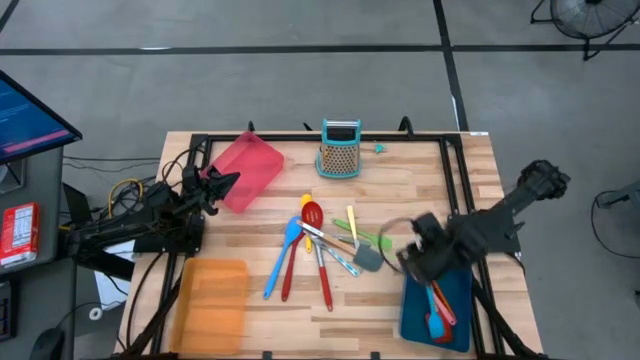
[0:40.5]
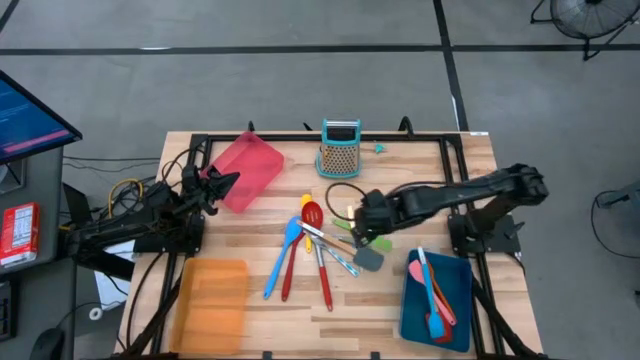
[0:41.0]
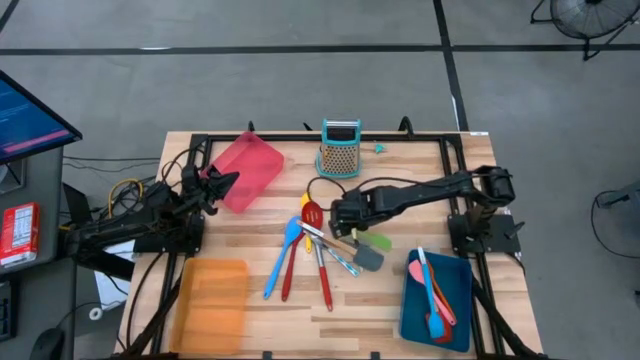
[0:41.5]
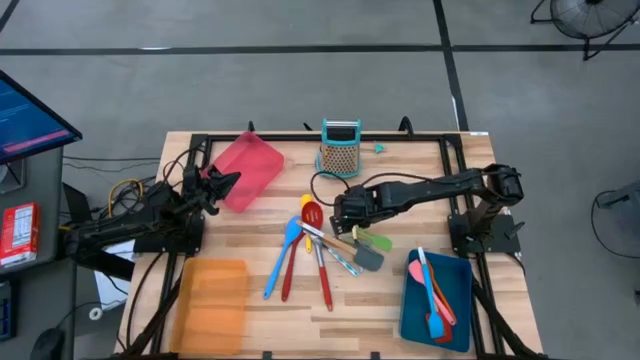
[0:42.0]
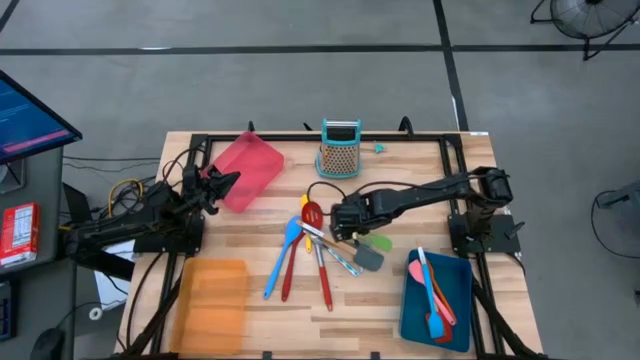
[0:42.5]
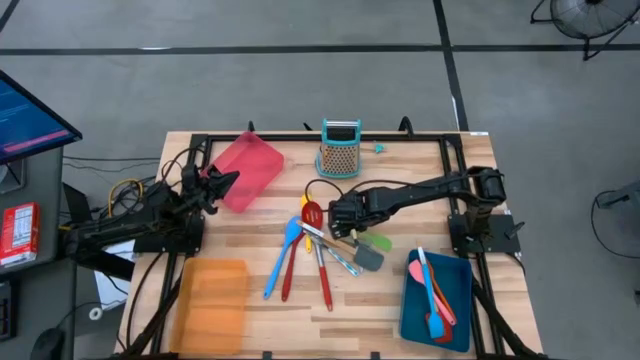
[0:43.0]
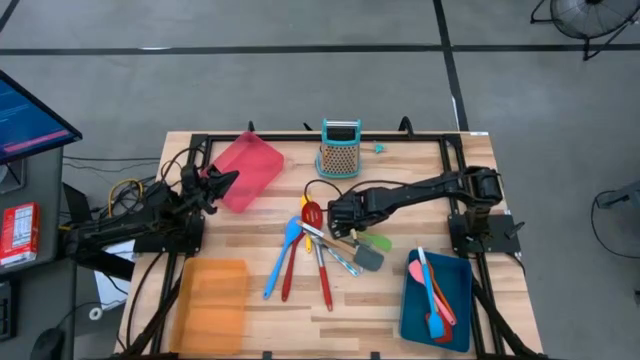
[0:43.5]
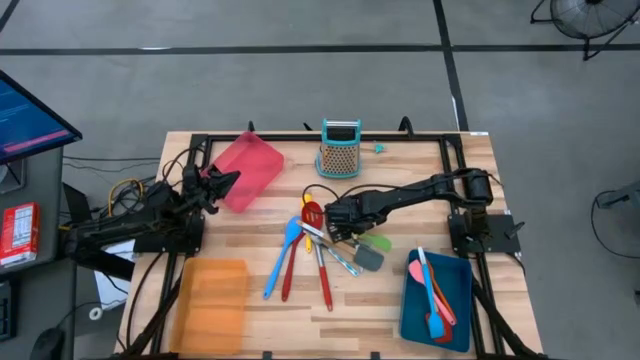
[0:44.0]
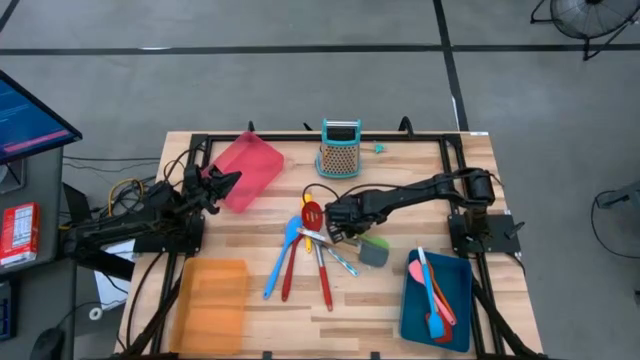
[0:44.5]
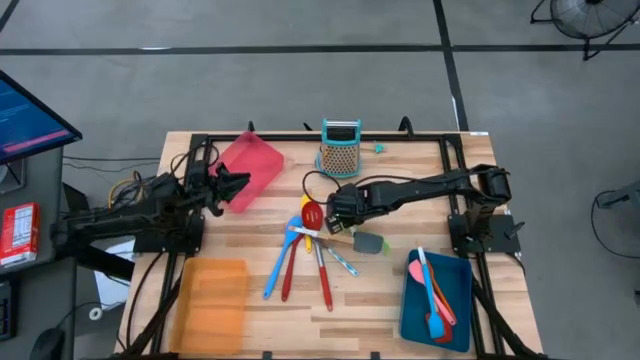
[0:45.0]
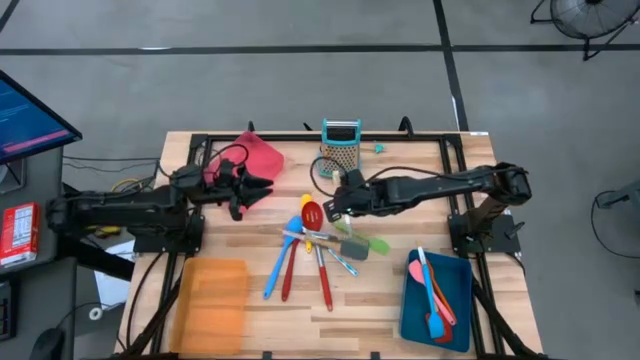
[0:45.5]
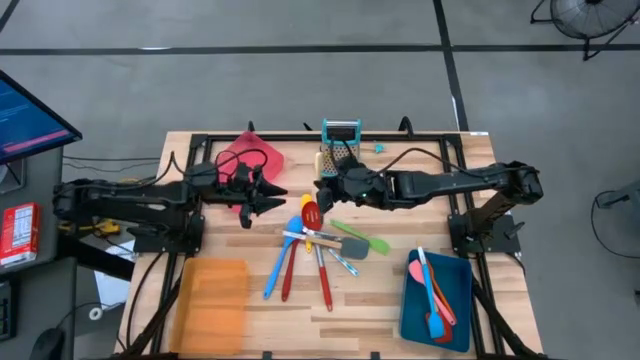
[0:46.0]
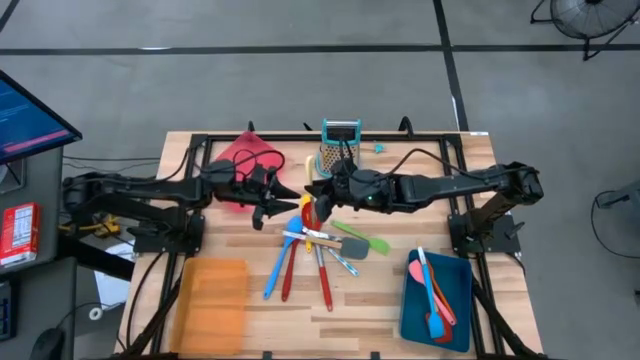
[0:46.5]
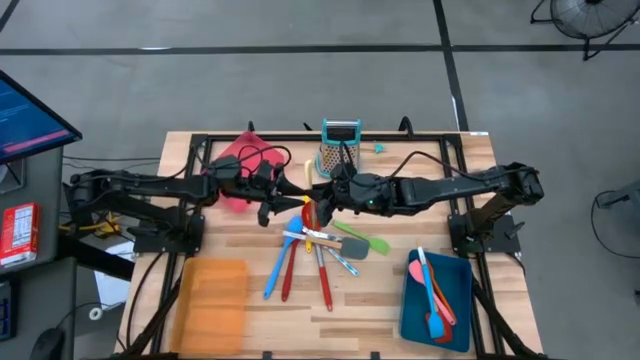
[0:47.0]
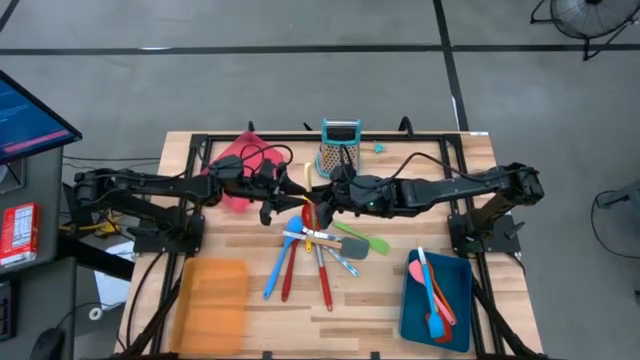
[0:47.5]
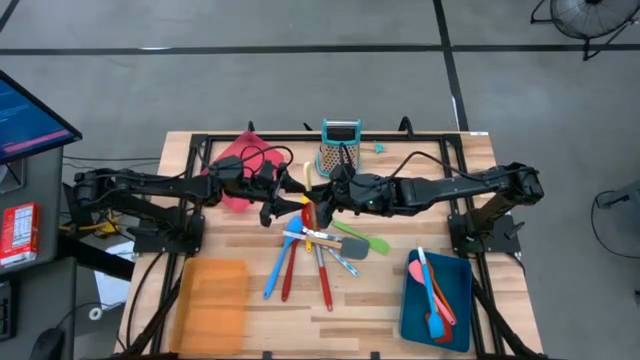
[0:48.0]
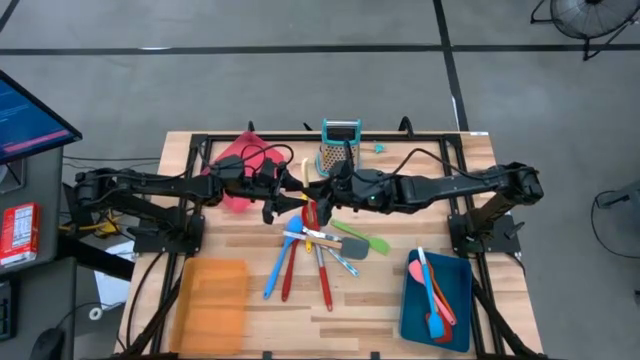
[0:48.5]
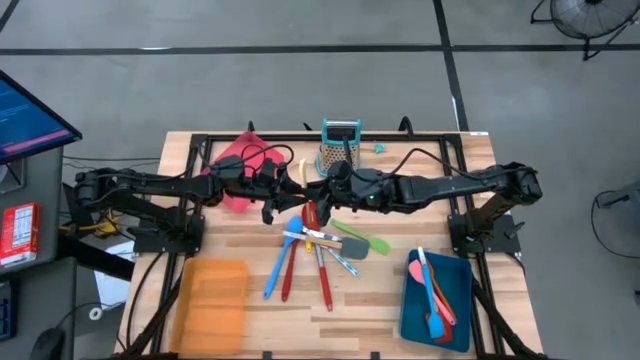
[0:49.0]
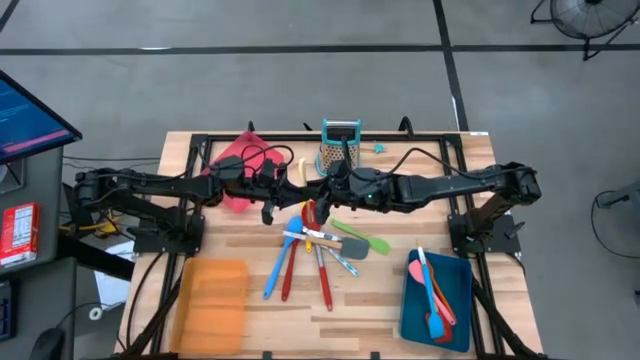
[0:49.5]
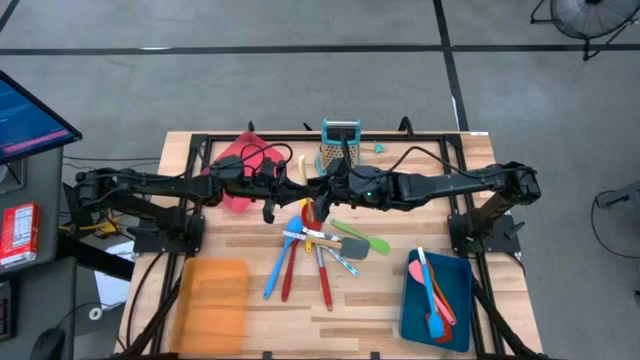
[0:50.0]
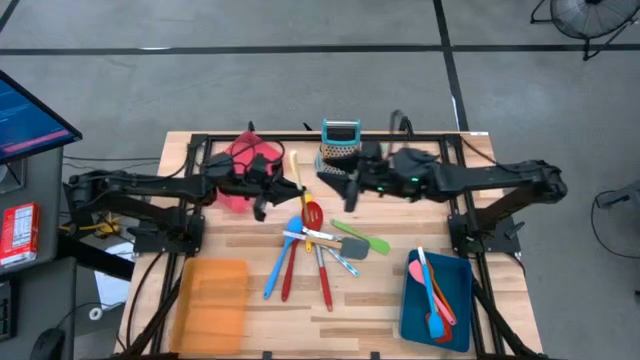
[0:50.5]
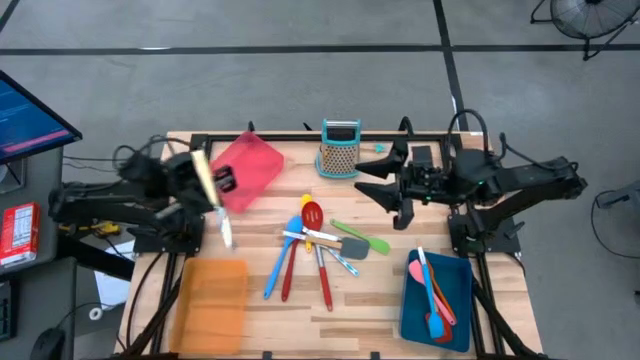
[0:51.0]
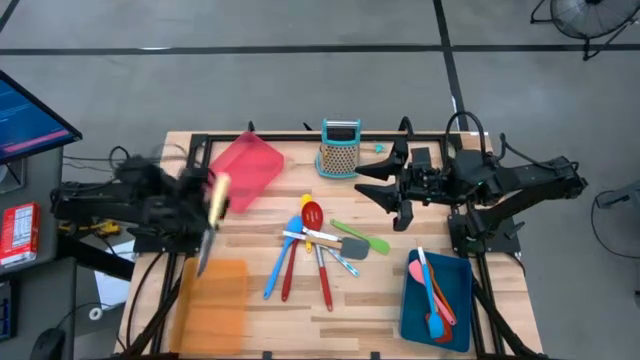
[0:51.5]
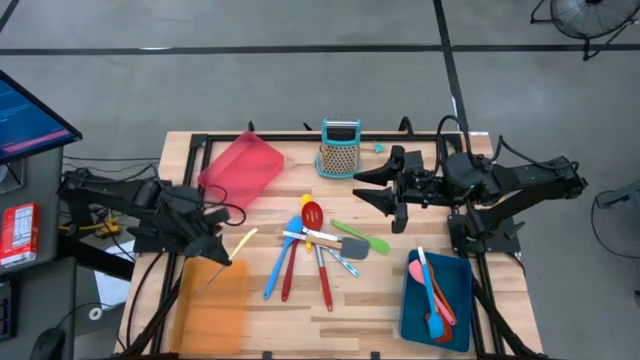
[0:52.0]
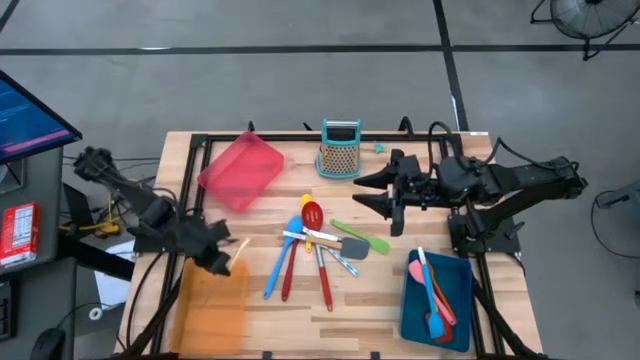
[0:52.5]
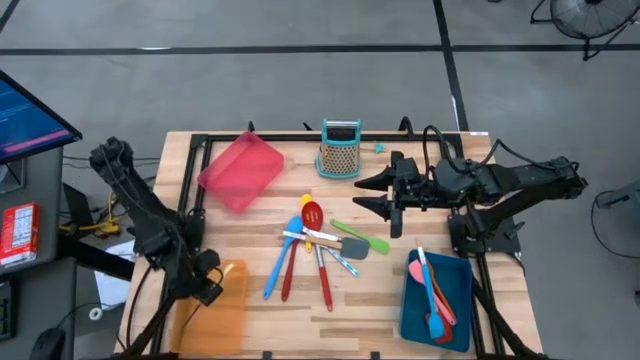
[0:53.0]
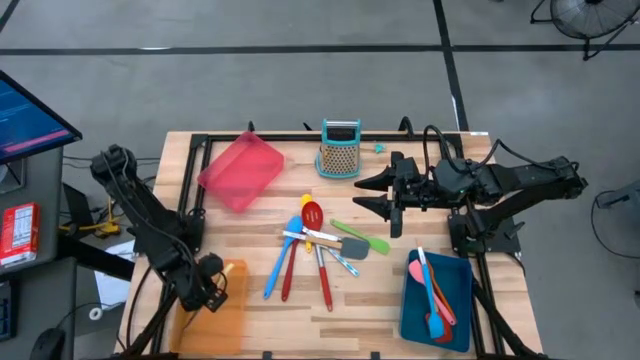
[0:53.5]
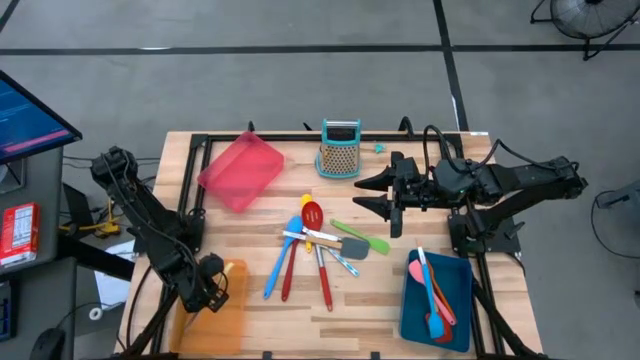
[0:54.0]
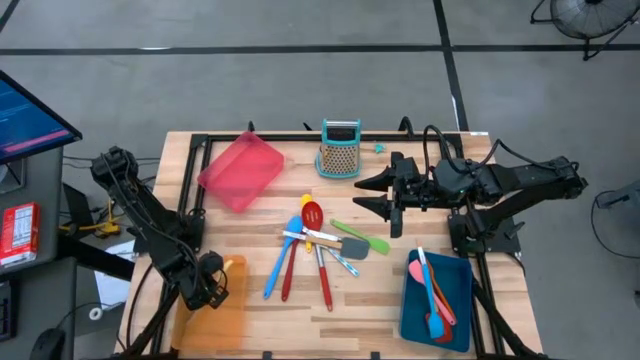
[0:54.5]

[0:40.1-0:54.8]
Task: Pick & Place Kitchen Items
Put the yellow table knife into the orange bin

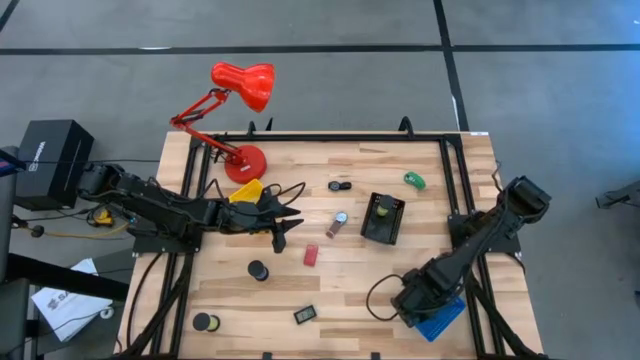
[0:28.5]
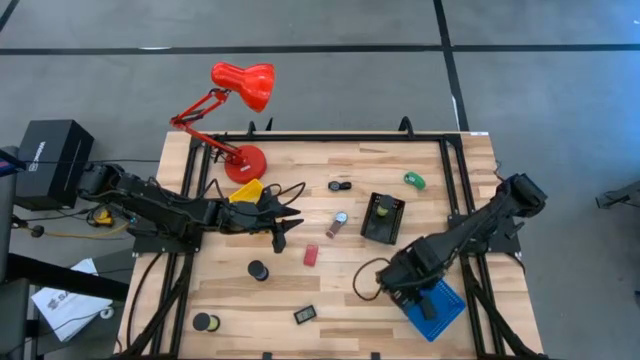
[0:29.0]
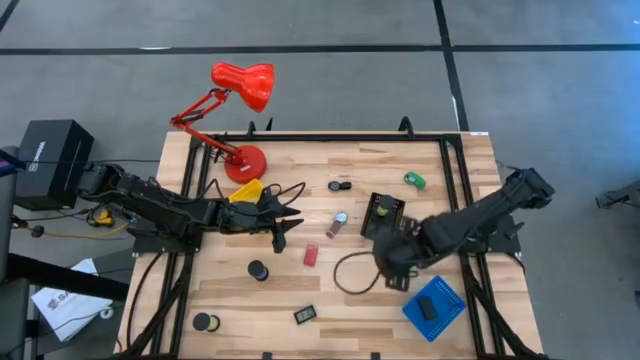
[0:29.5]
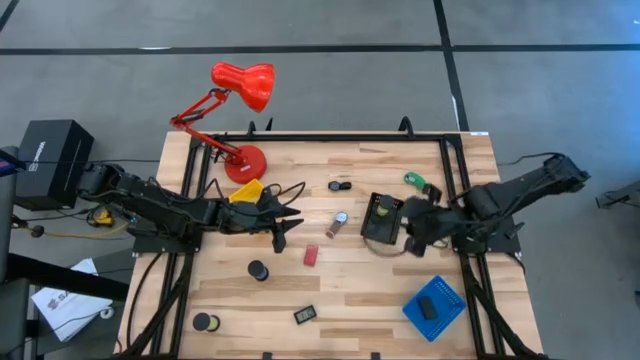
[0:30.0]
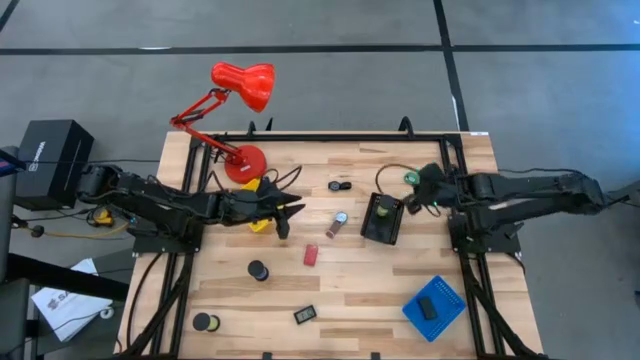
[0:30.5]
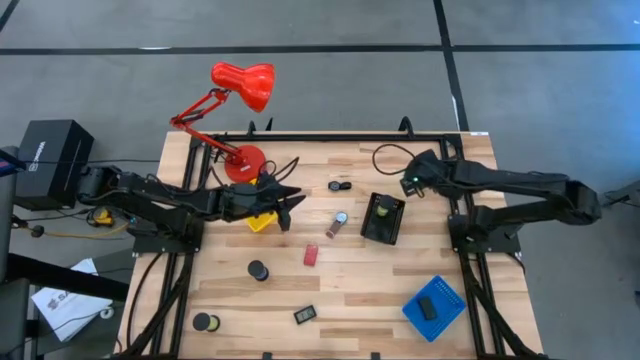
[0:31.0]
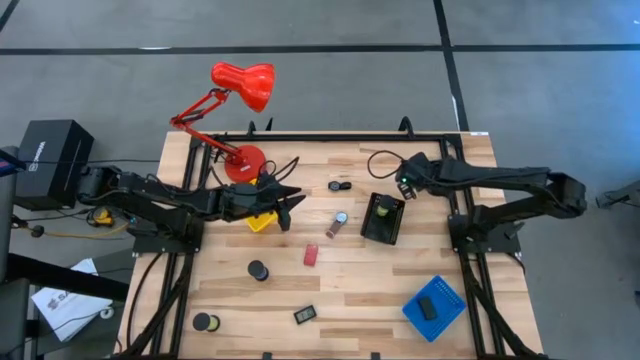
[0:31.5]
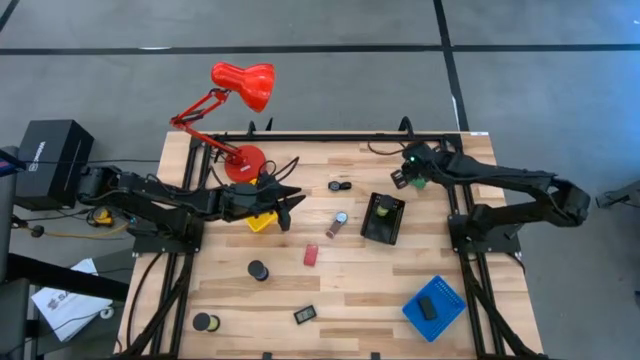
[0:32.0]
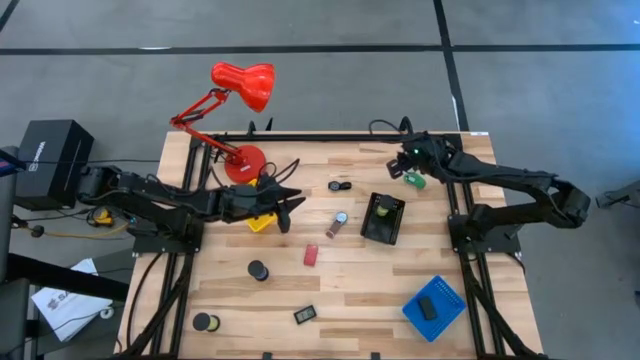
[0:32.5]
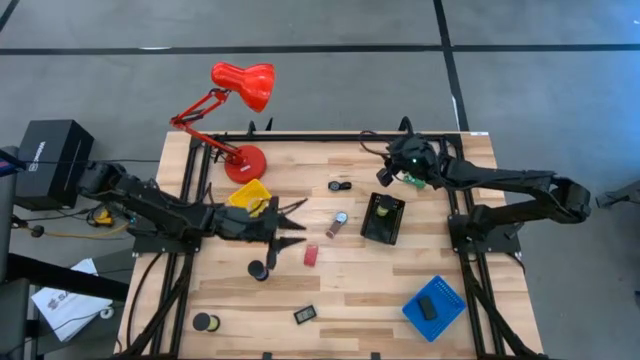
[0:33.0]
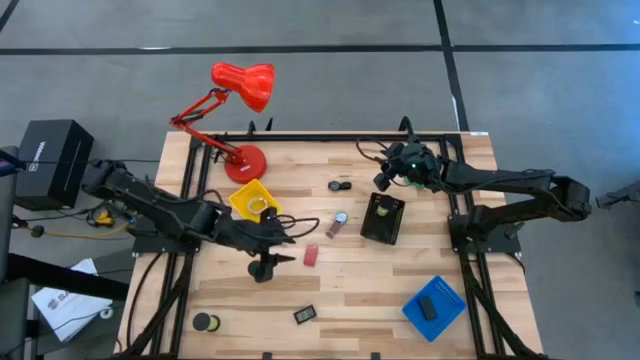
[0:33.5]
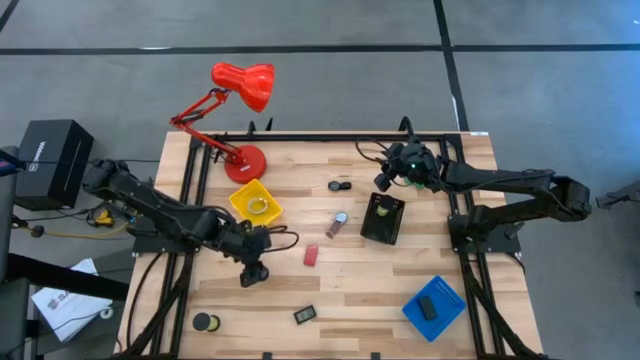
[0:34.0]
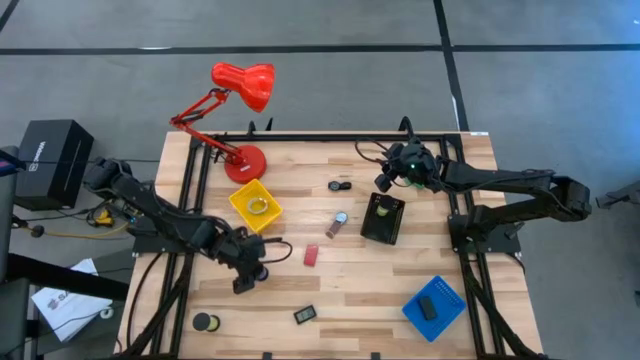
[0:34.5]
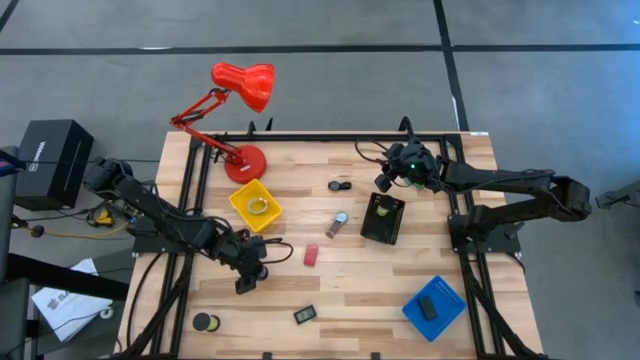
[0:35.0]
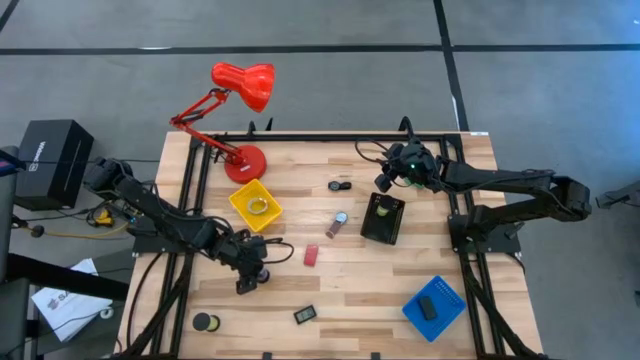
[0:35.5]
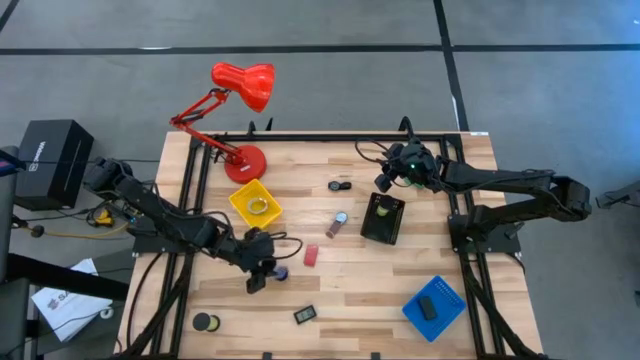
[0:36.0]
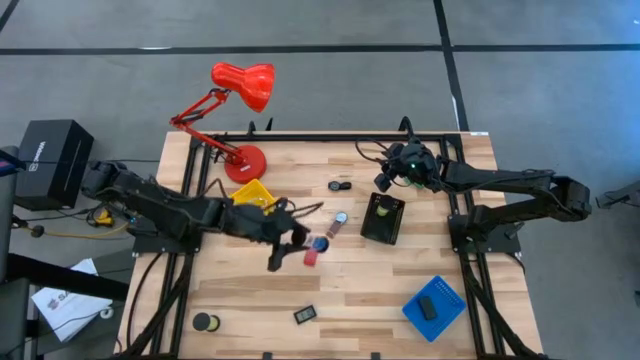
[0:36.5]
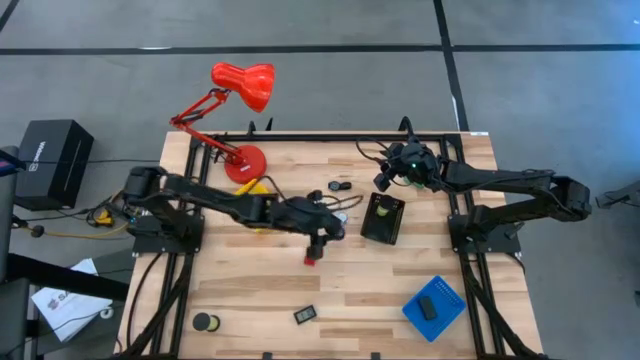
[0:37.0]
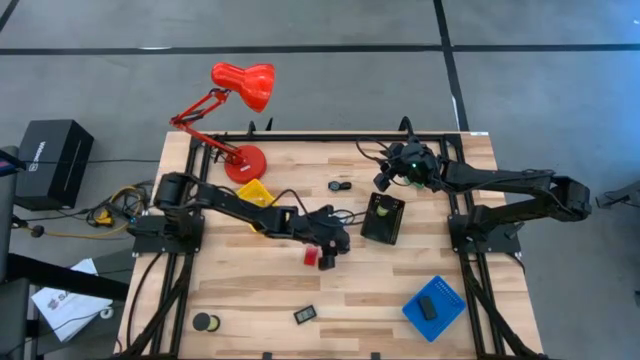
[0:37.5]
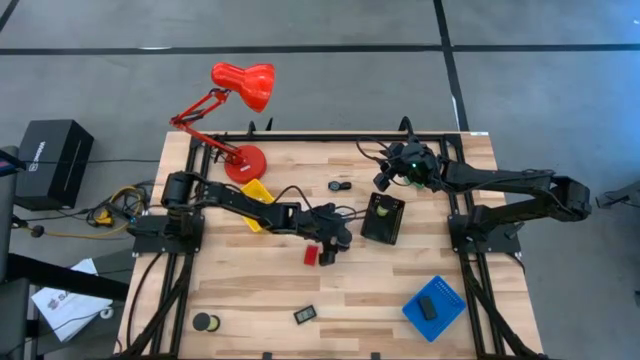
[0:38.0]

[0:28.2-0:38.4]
Task: Pick & Place Office items
Move the purple hourglass to the center of the table
